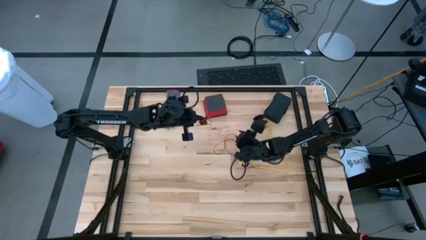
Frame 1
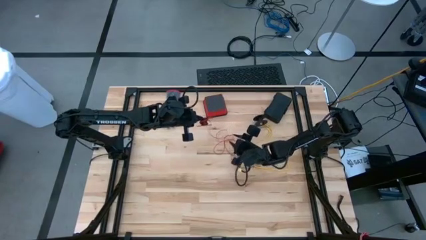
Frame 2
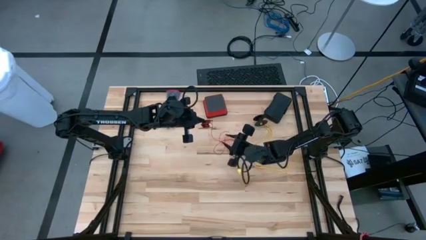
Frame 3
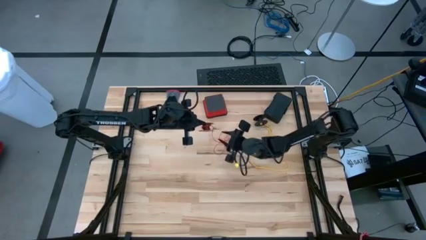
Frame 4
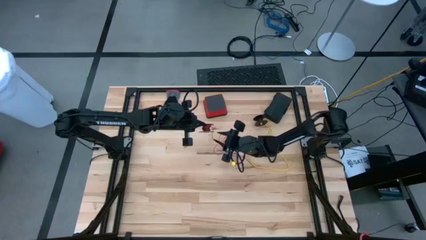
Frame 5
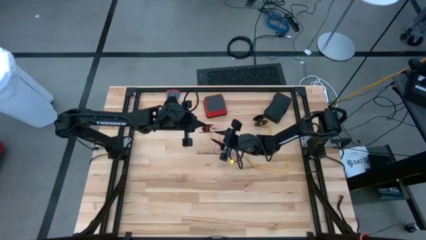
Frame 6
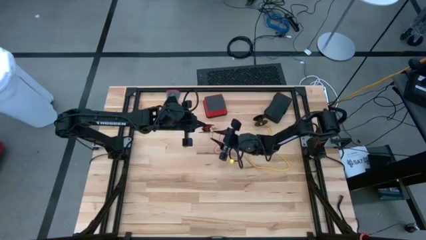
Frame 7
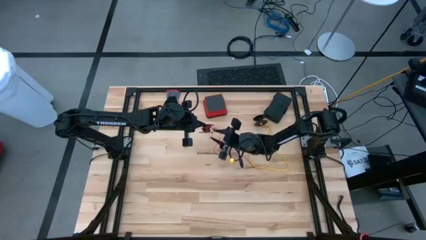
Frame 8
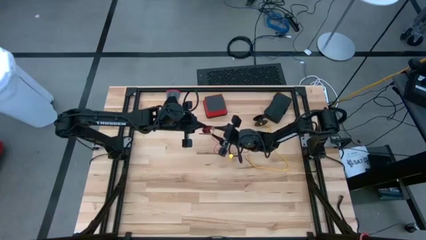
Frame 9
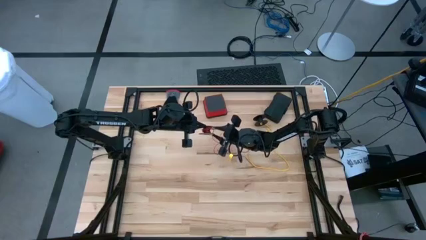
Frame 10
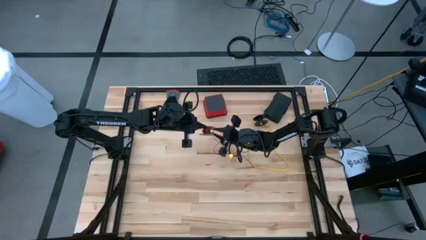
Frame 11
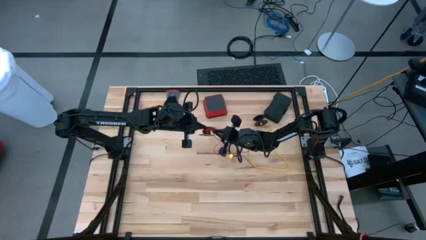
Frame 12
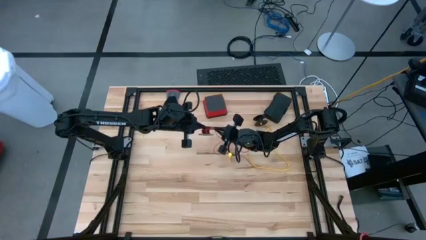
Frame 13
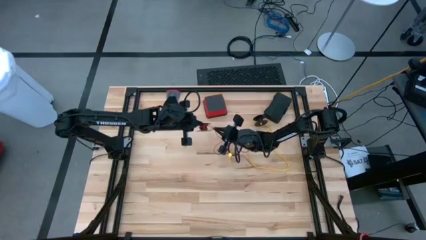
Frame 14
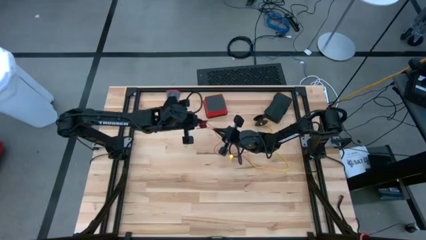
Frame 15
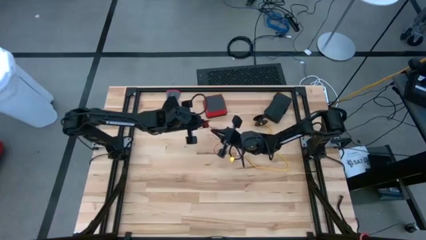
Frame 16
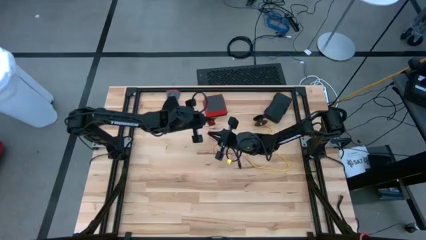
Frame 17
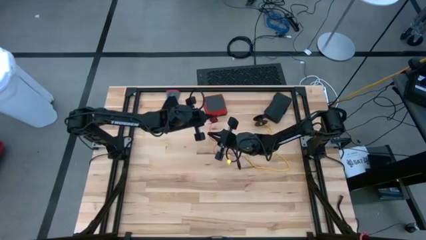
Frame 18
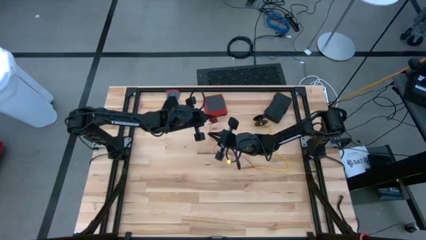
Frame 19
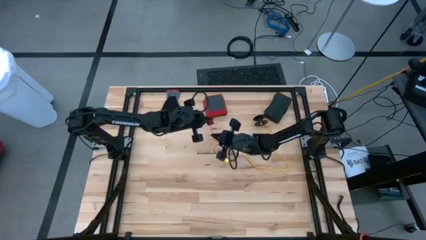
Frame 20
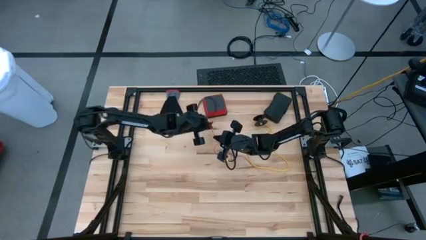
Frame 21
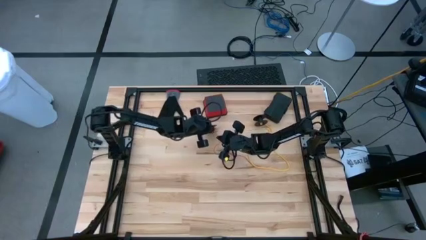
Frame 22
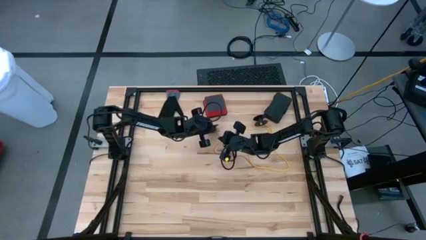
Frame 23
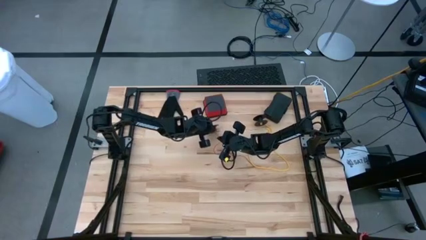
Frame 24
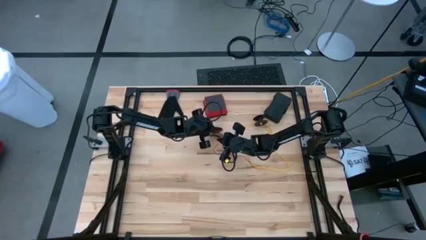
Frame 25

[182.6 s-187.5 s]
Task: Coil cords
Uncoil the red wire from the spool

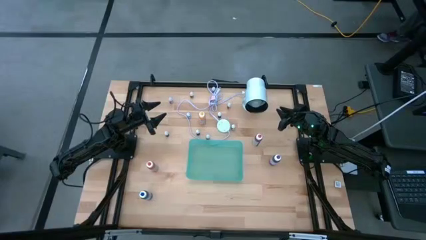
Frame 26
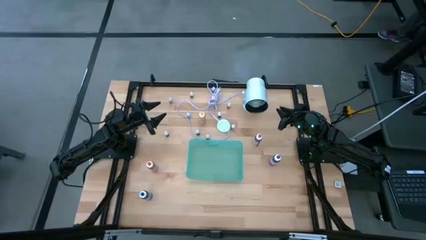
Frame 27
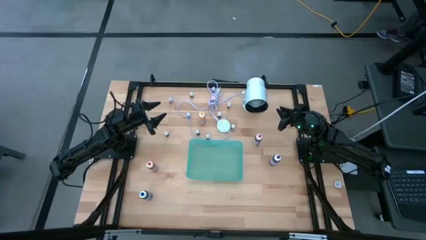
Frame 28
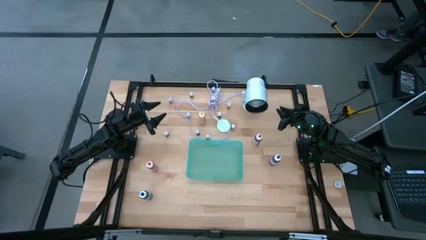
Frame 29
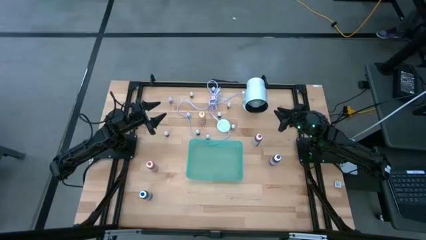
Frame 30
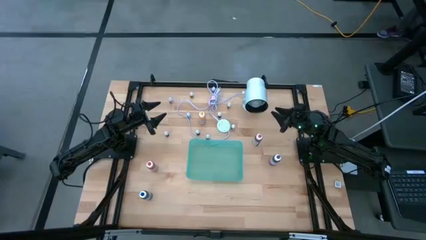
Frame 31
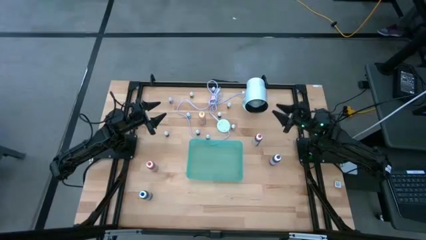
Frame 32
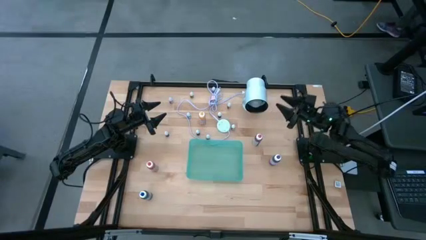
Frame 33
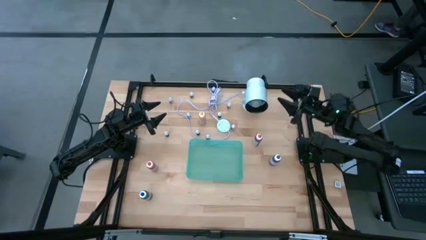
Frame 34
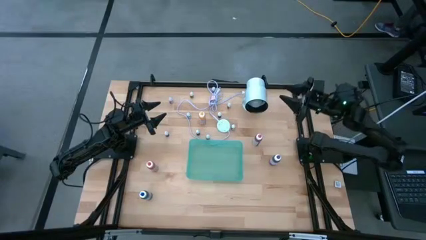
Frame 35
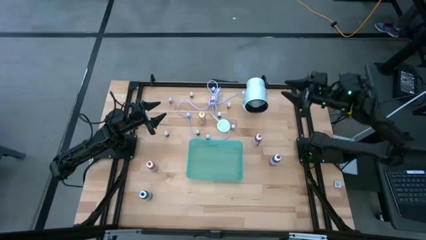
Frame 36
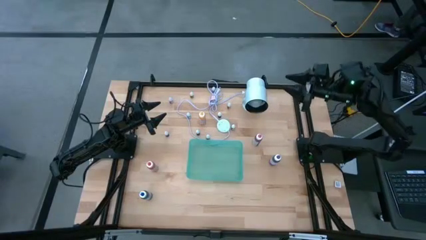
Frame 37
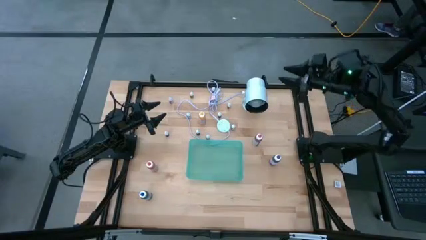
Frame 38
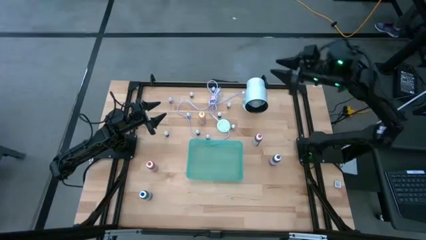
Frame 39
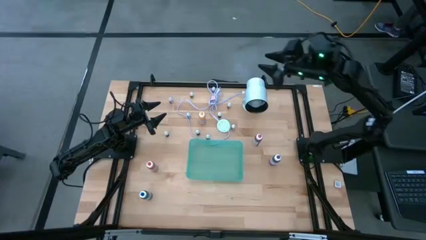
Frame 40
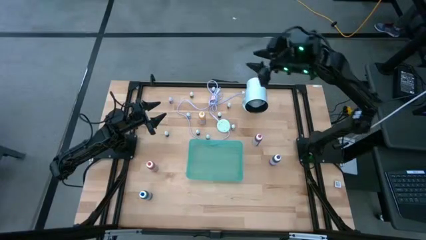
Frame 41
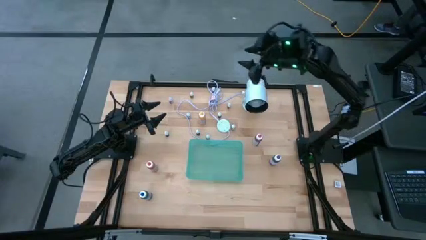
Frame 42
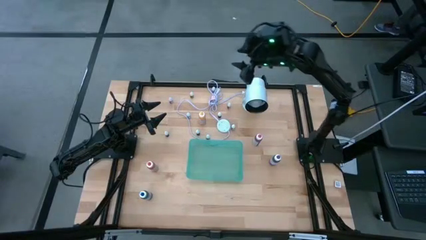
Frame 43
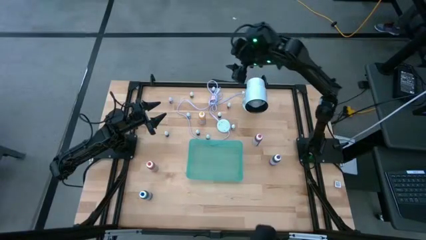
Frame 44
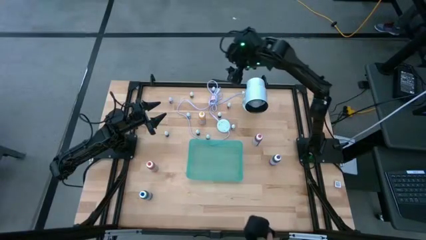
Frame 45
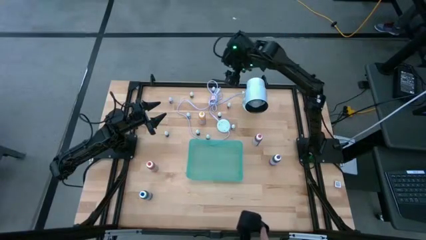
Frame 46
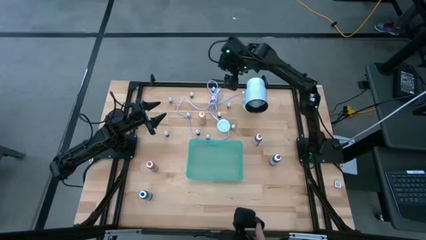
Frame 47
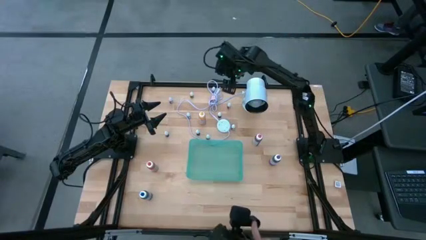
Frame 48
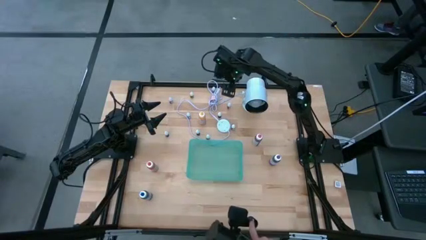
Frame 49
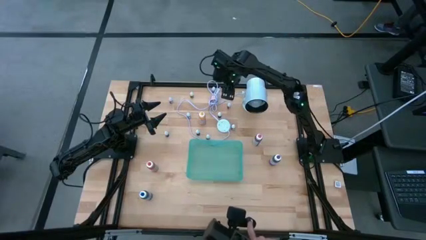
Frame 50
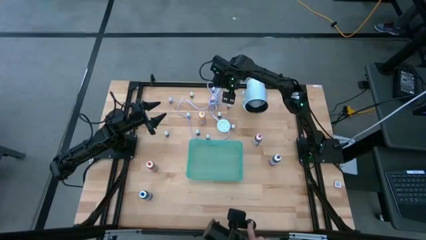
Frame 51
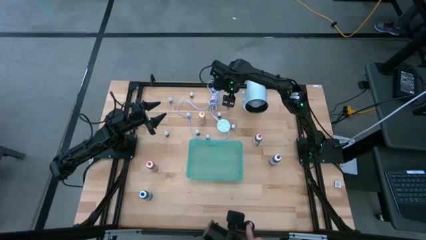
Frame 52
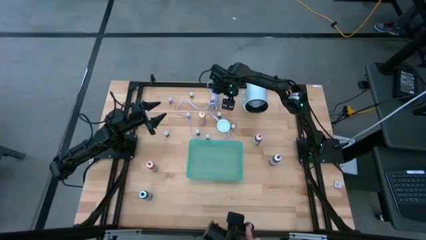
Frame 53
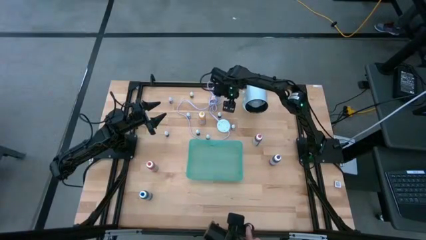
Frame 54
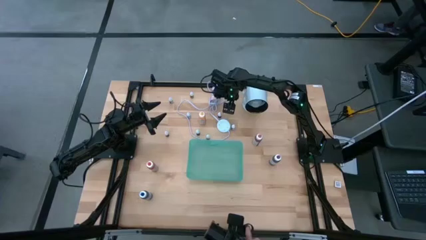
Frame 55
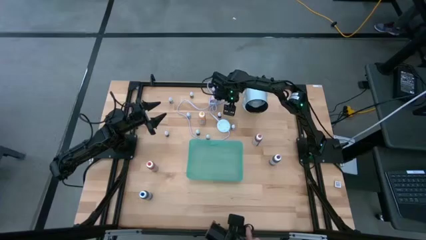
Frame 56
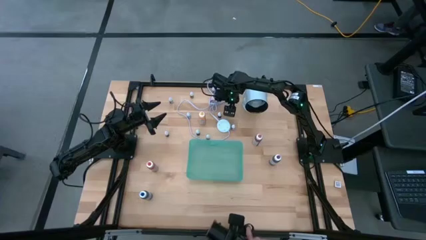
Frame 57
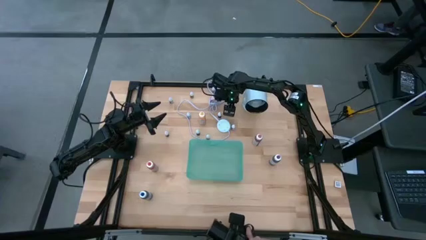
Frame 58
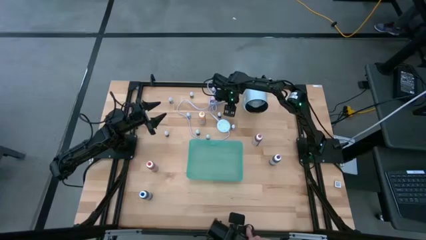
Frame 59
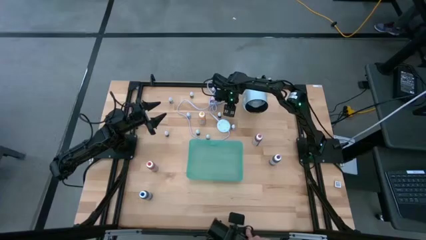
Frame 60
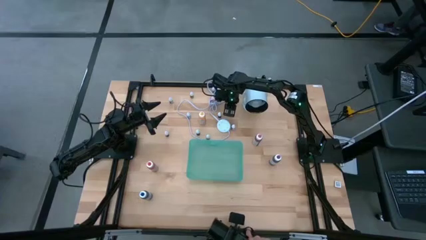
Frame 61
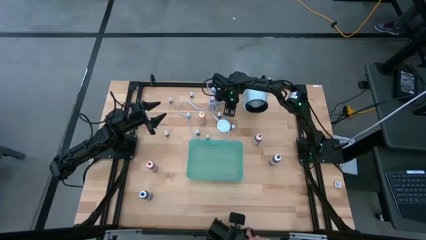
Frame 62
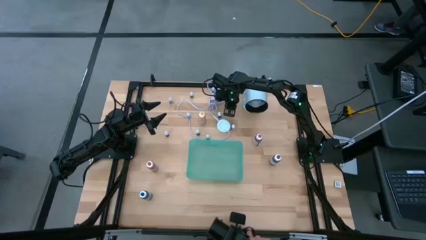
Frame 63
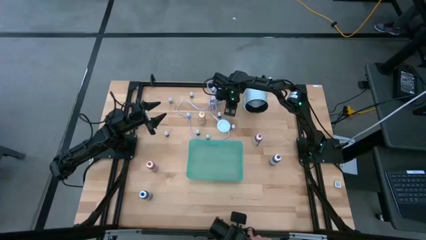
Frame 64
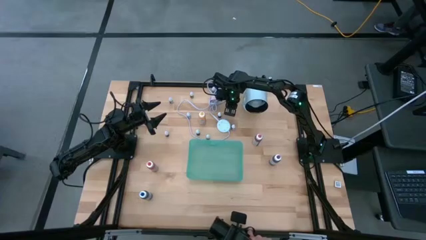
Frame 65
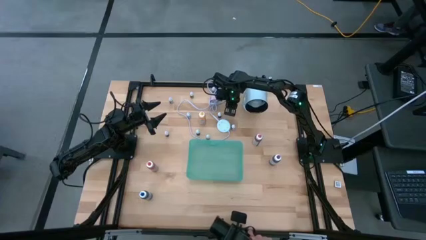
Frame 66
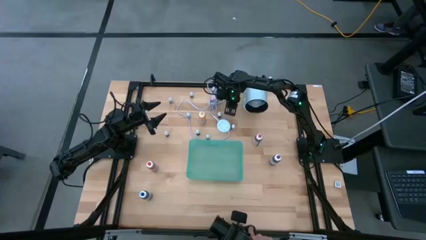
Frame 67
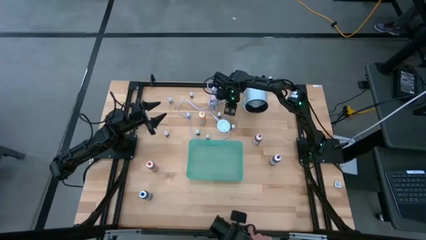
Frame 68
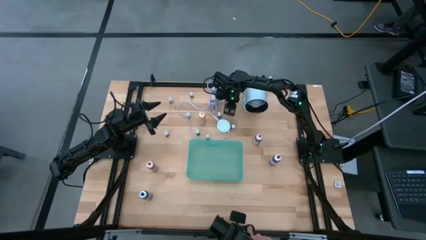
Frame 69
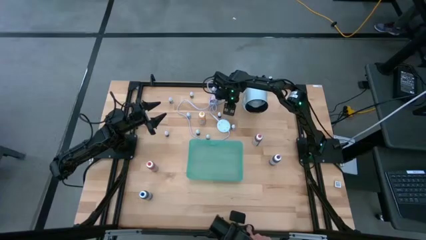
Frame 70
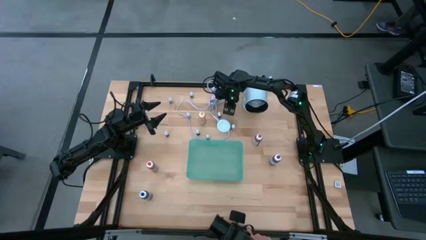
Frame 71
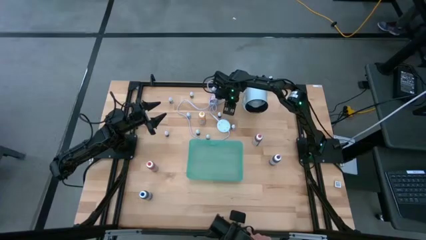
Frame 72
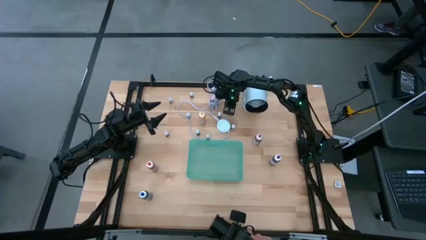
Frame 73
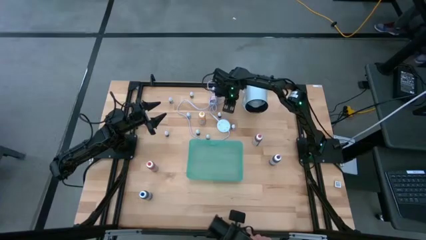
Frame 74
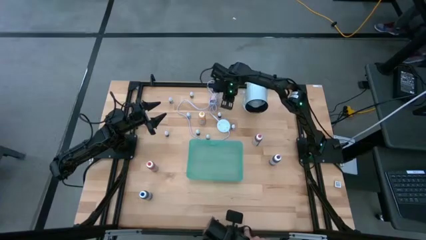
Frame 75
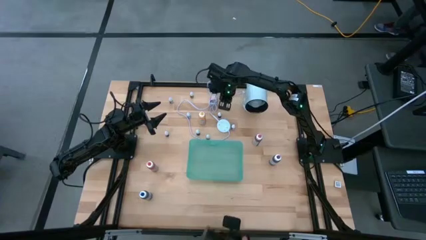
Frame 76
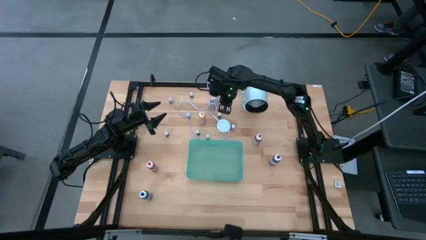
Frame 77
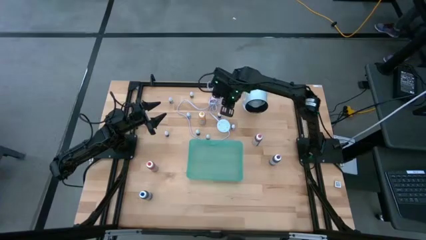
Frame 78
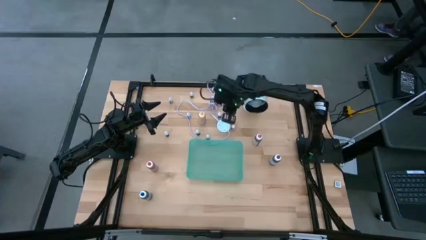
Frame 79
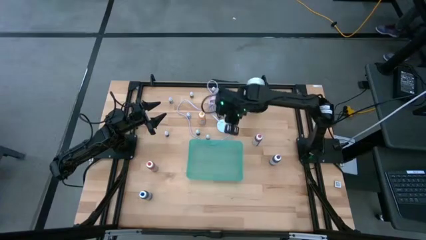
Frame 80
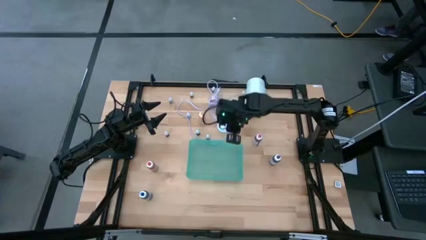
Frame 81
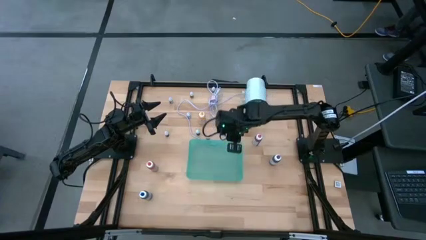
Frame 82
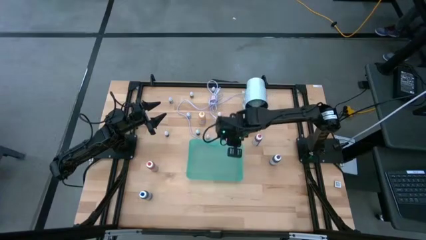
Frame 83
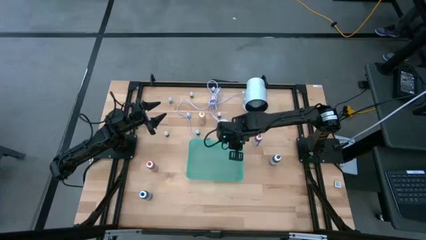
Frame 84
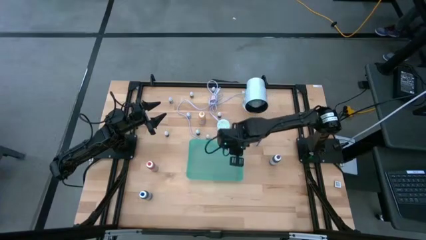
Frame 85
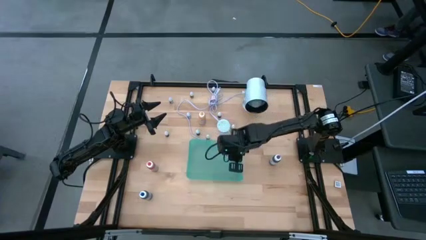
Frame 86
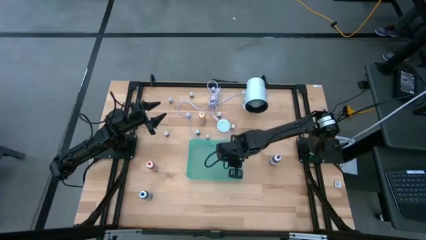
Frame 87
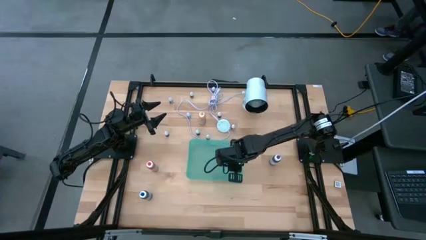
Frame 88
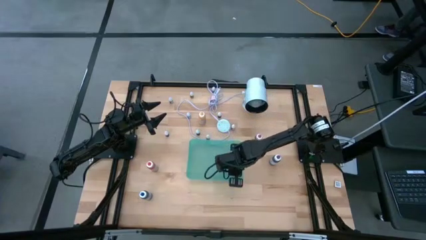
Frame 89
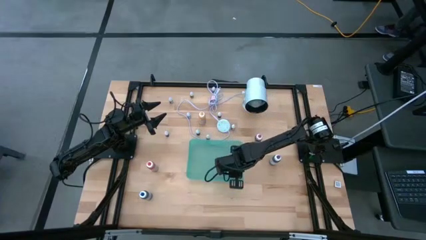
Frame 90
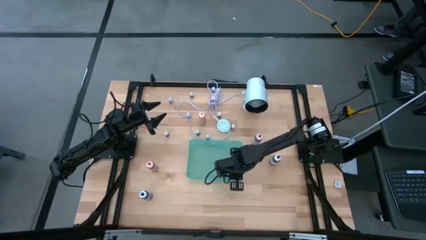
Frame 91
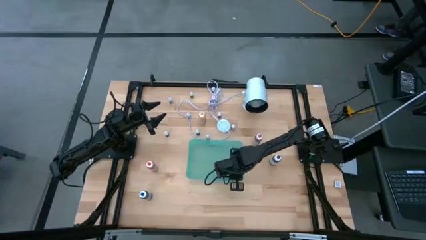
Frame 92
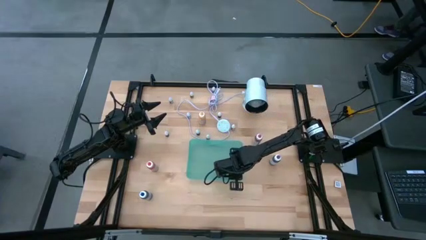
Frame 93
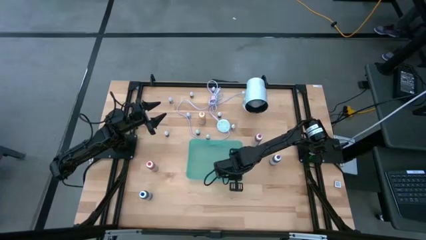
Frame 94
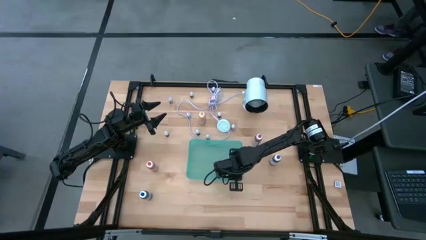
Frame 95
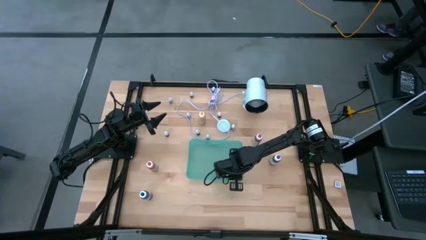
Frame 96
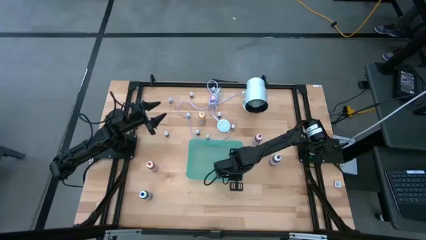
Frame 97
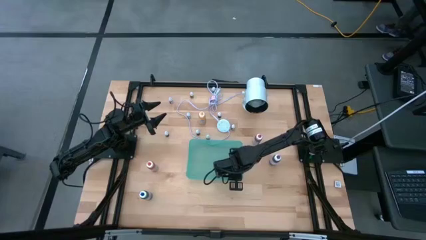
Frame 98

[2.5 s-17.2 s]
Task: Pick & Place food coloring
Put the small red food coloring bottle into the bin
